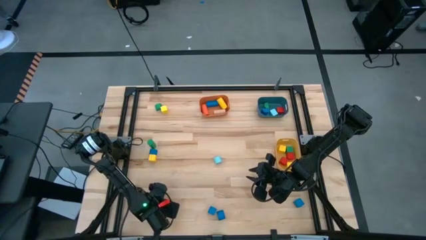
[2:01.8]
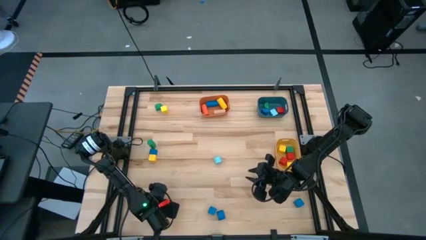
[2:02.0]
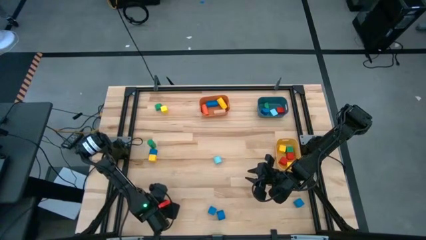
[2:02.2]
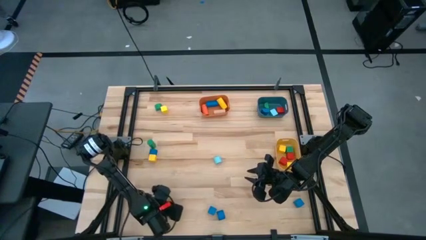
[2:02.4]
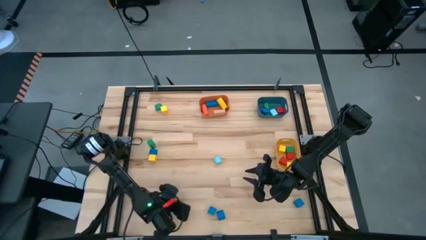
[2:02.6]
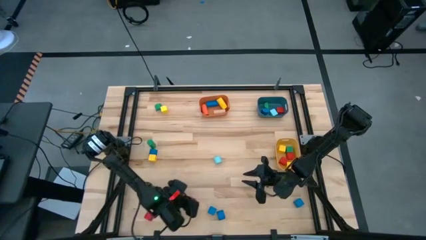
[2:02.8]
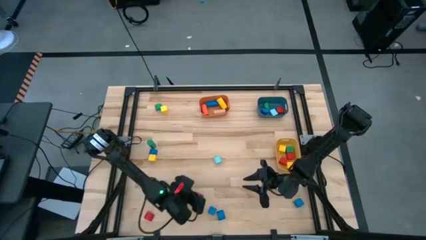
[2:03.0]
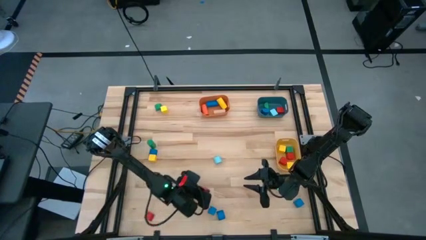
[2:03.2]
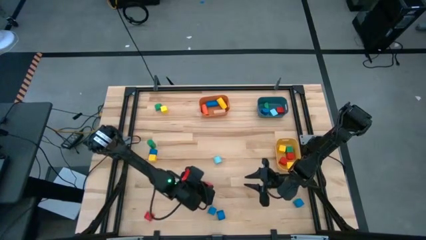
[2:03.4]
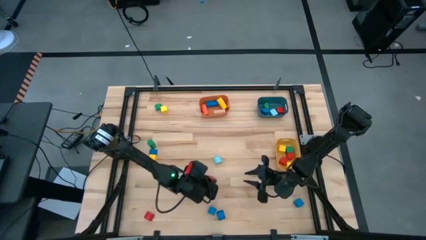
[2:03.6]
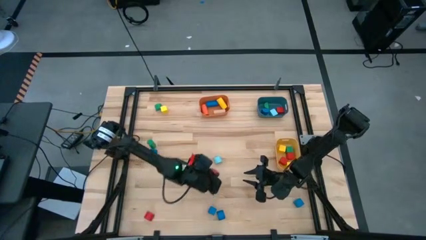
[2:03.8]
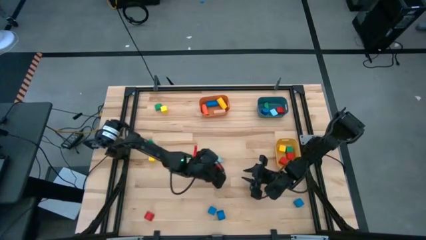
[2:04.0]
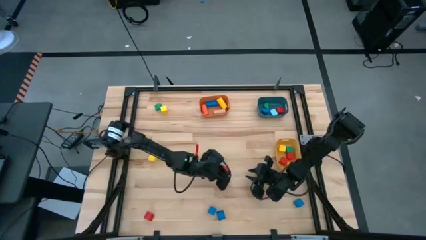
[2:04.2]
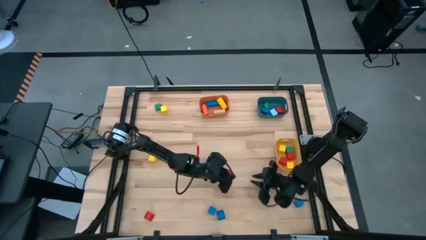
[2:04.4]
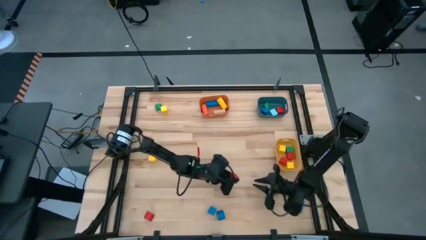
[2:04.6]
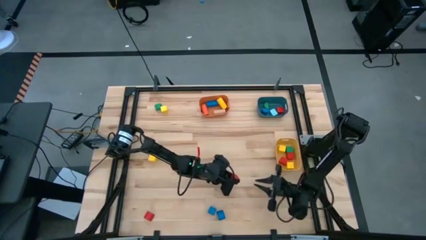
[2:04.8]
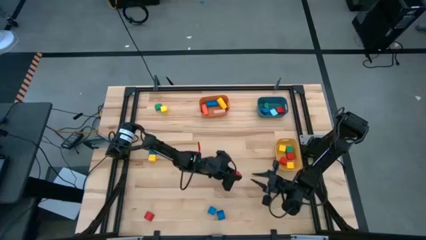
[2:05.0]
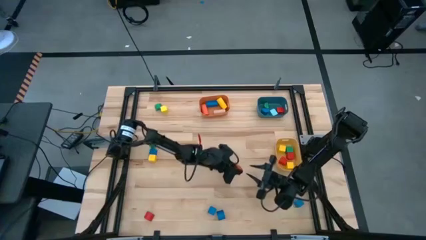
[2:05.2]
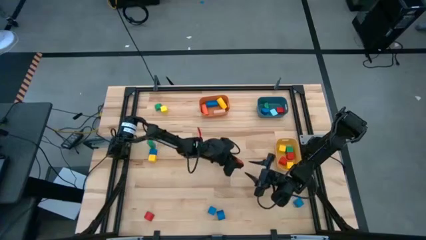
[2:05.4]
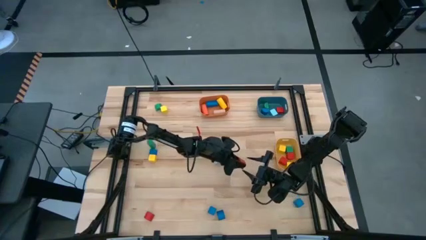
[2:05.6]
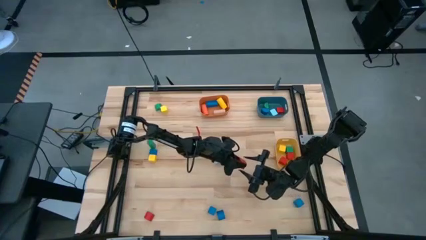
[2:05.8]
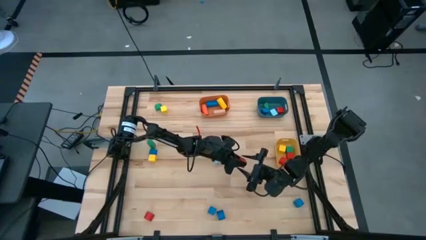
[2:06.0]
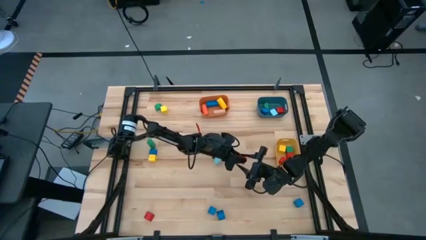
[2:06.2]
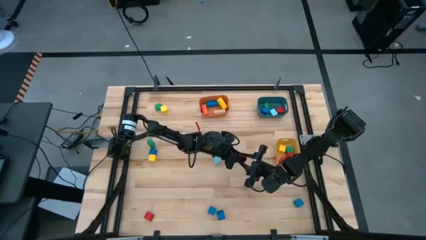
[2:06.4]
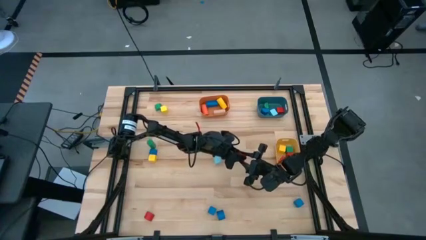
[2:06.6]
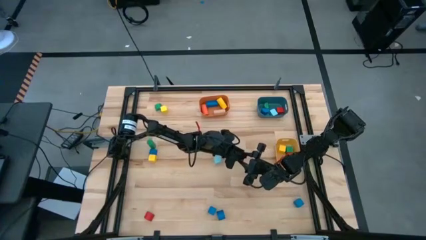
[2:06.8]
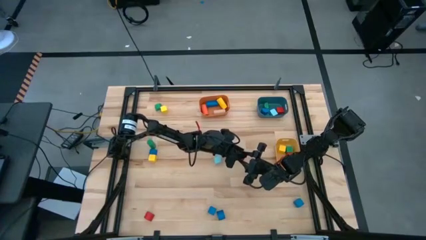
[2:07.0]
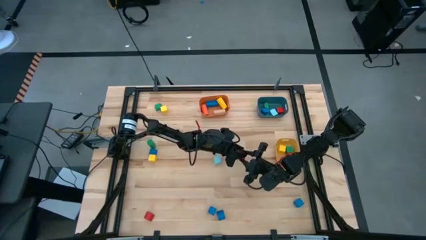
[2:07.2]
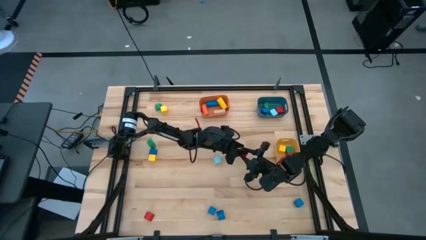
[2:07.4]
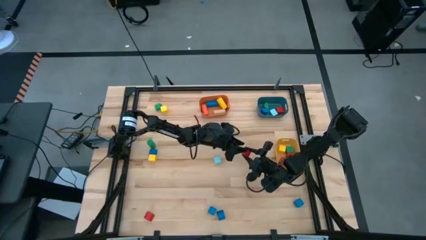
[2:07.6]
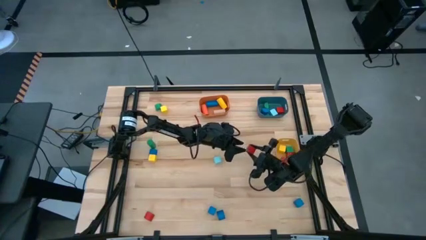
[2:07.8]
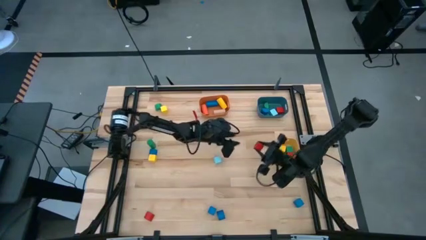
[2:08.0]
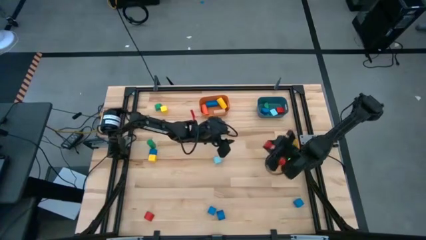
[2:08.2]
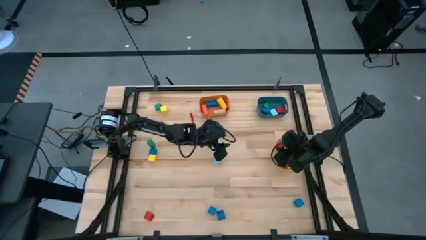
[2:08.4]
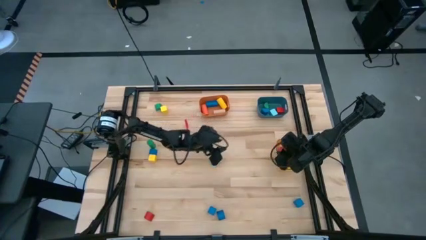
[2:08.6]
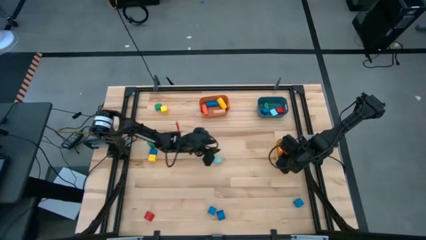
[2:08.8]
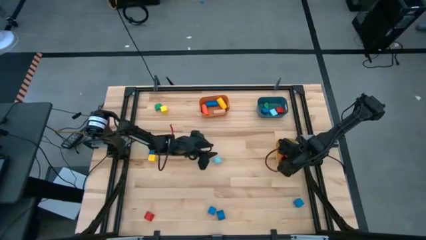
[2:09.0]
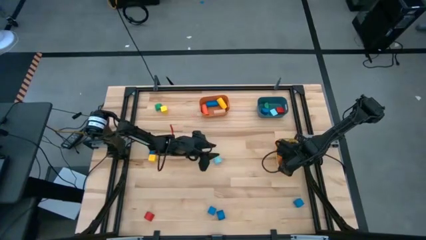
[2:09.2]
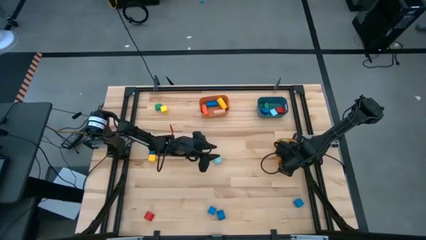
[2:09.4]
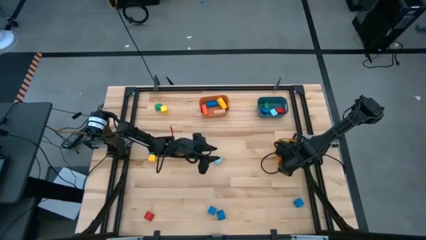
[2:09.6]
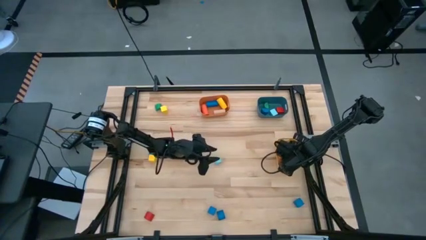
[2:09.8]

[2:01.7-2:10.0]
Task: Sort blocks by size
Put the red cube block into the yellow bin

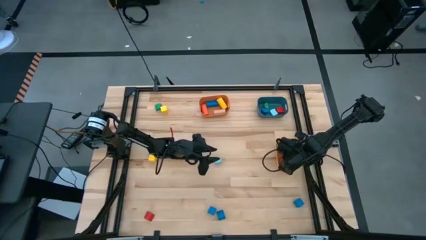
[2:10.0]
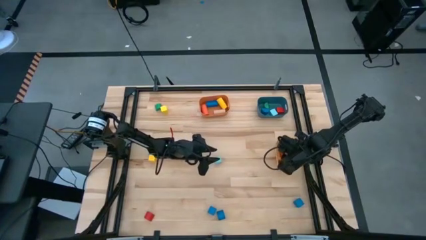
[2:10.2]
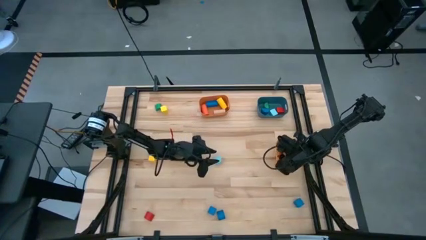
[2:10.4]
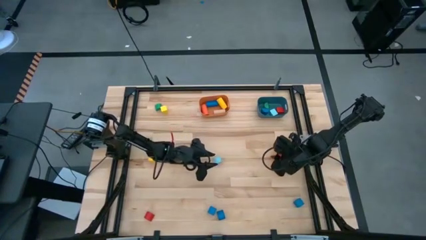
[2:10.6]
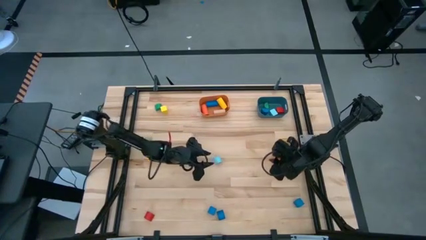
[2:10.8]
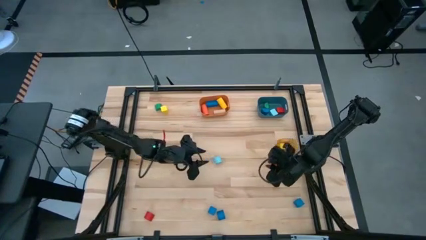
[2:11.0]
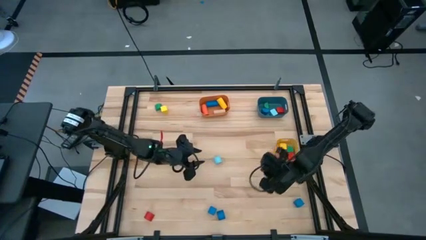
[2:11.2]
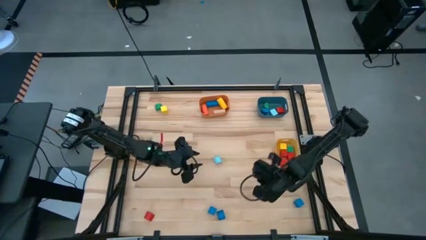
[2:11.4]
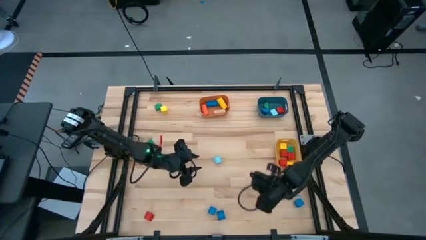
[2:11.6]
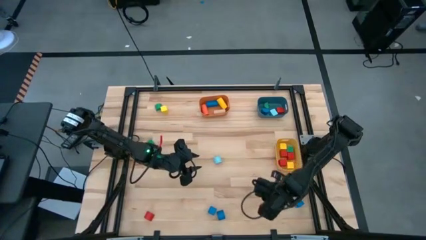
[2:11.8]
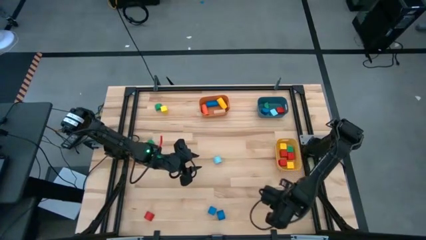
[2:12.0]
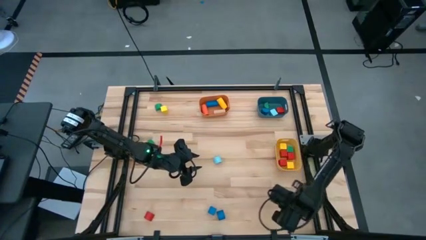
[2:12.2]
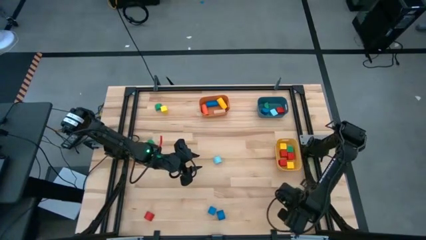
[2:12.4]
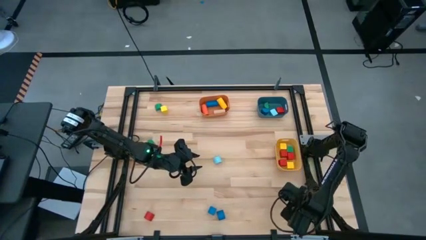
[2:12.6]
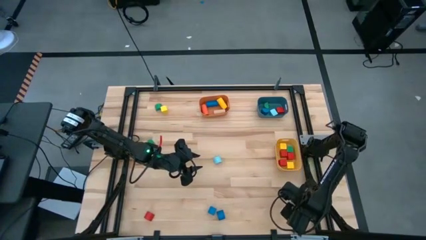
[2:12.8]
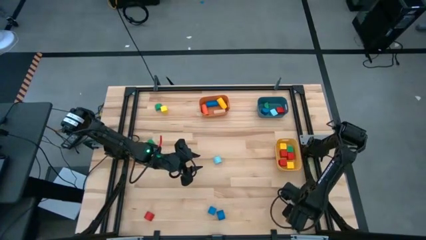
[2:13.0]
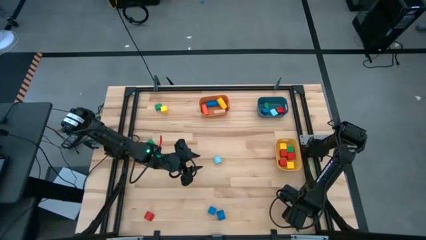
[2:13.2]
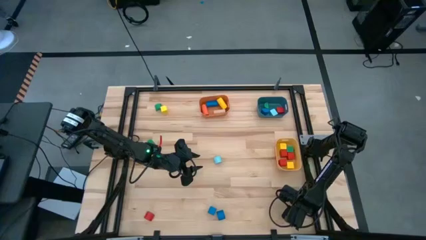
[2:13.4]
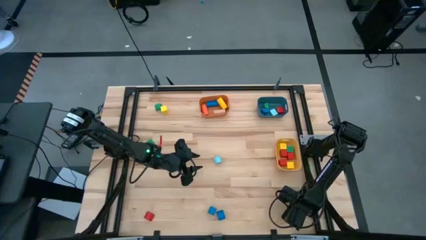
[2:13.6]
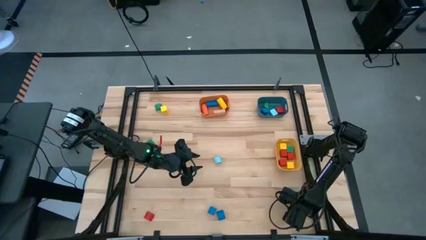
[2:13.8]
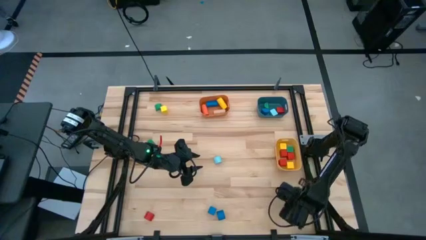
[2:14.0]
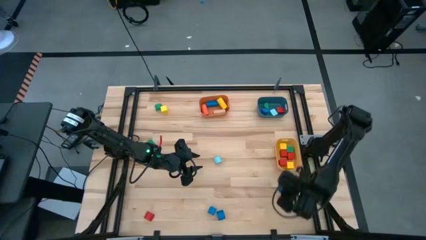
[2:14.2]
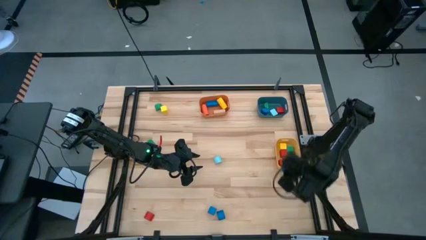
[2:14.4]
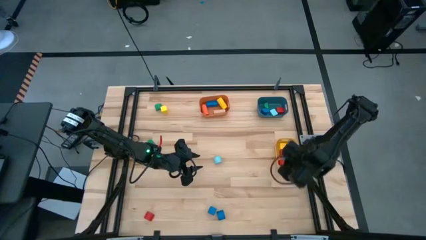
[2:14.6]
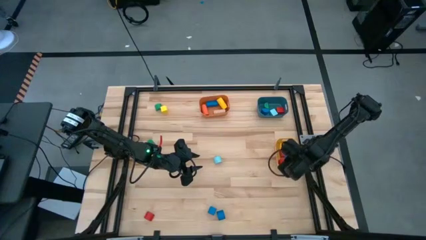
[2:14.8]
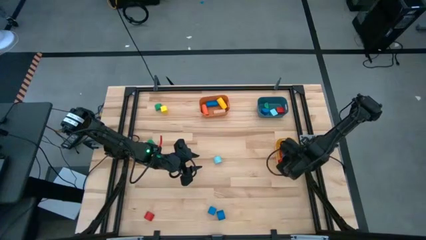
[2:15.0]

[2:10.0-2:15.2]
Put the blue cube block into the yellow bin
